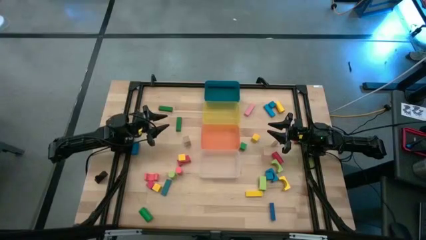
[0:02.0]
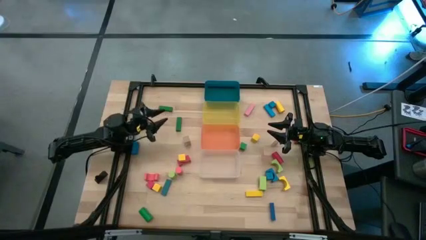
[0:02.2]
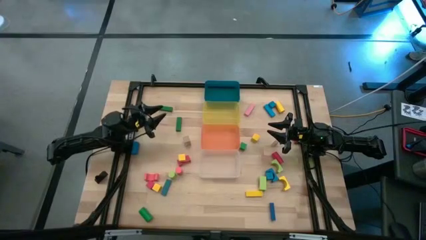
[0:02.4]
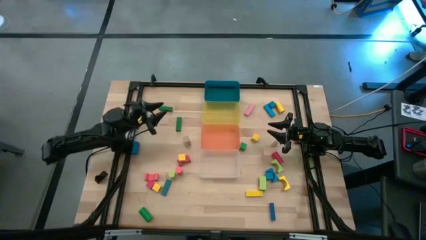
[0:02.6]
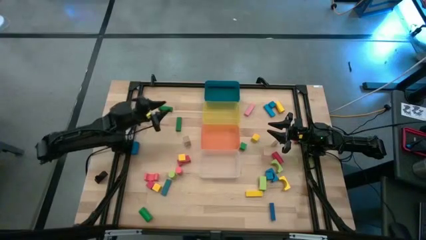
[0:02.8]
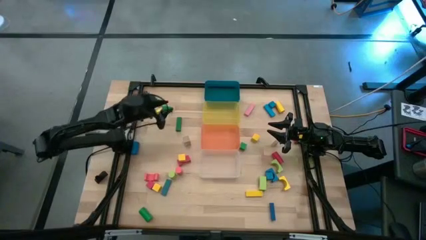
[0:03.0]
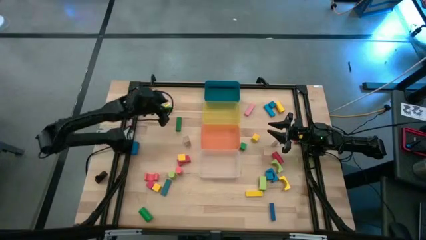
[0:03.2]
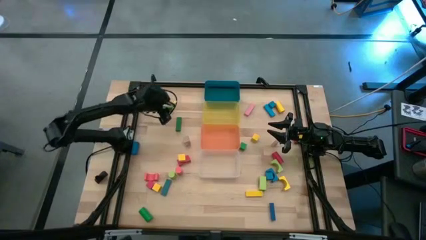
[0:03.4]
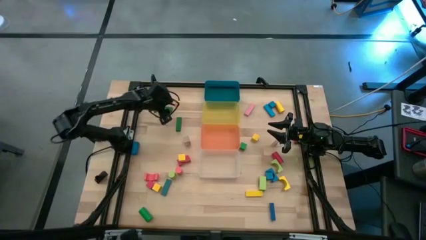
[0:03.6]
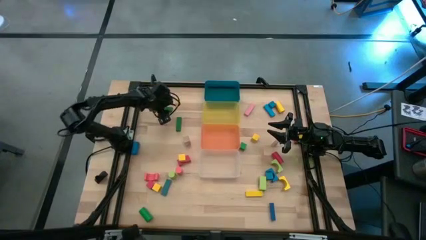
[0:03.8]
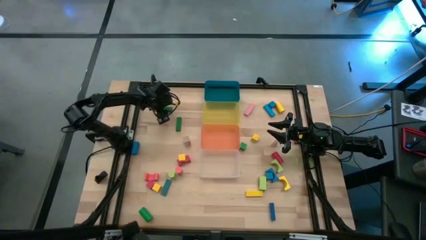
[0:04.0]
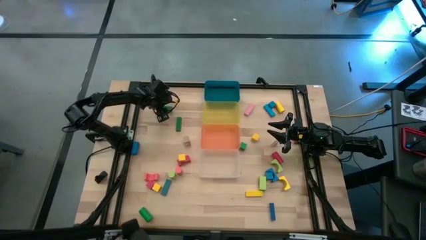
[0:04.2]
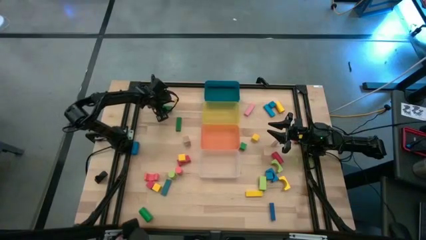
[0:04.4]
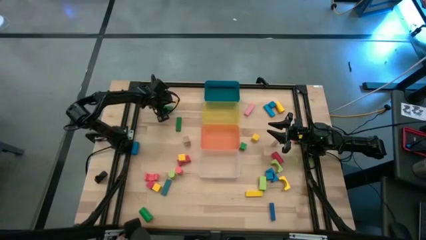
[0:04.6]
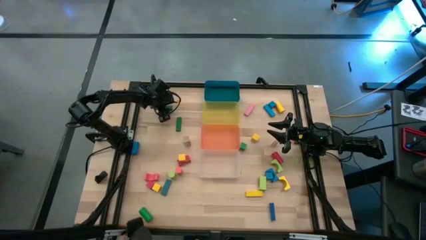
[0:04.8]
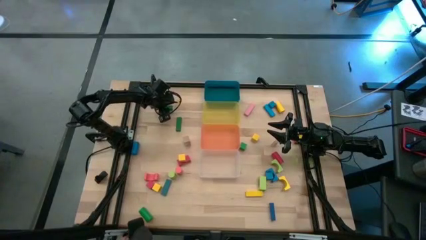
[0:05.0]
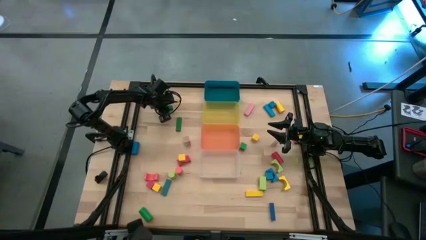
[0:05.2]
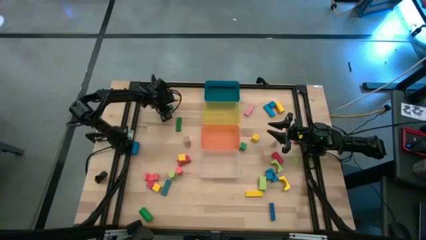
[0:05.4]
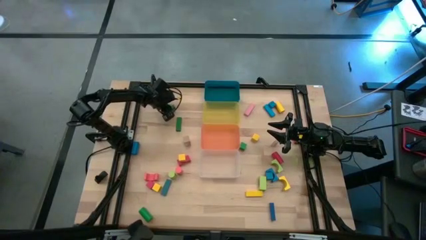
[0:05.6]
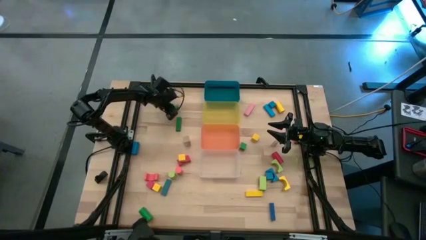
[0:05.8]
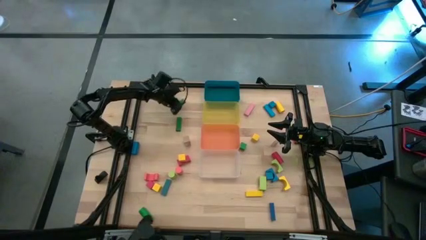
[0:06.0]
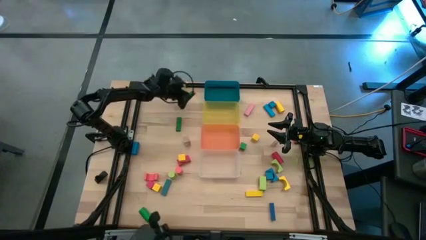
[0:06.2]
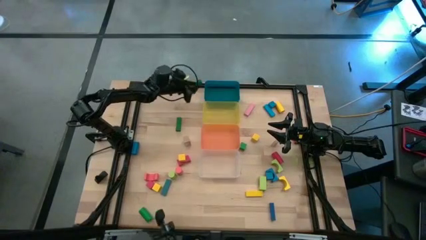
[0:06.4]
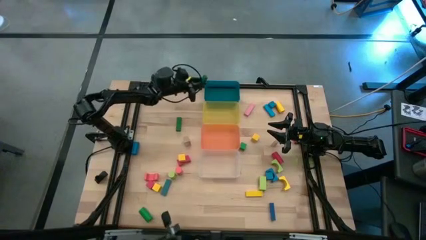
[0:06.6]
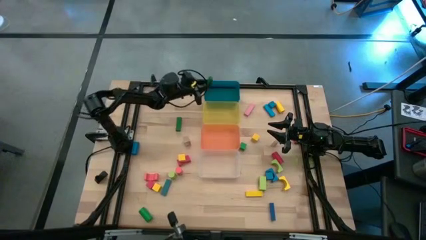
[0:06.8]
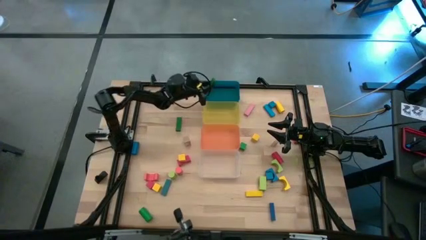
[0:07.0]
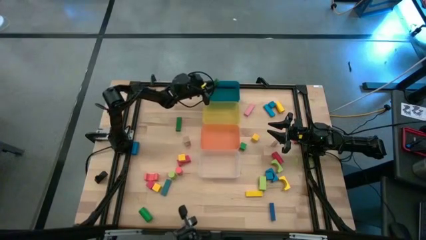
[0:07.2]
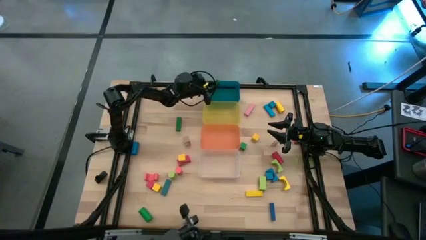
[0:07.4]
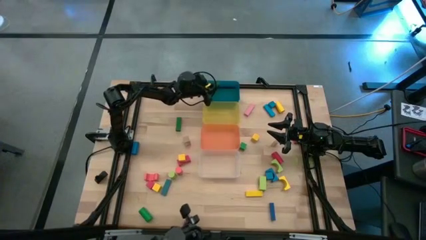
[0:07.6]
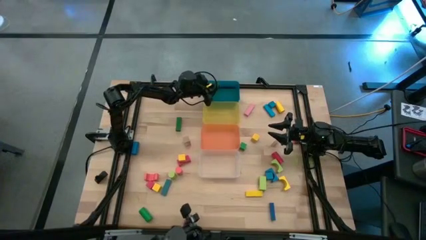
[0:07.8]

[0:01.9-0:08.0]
Task: Sort blocks by size
Put the green rectangular block into the blue bin

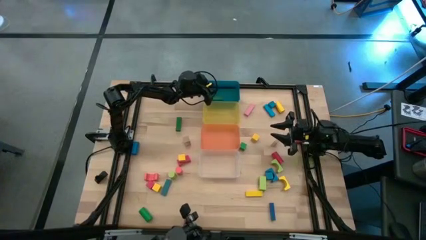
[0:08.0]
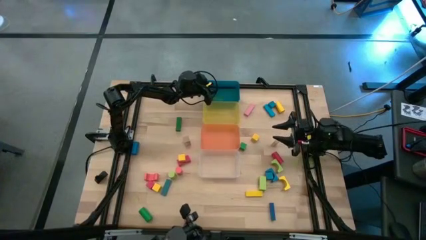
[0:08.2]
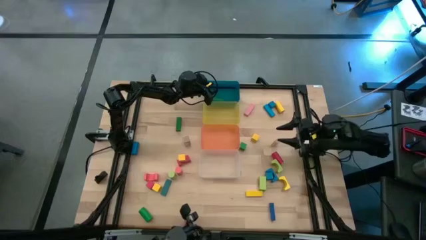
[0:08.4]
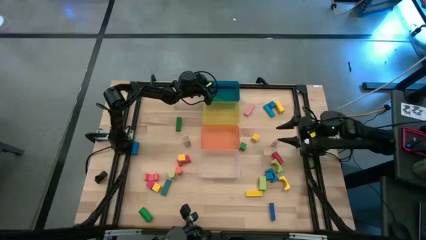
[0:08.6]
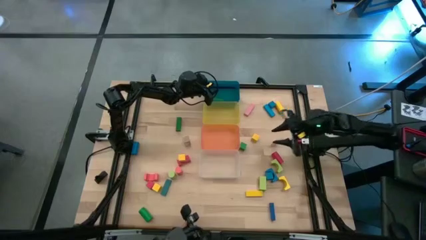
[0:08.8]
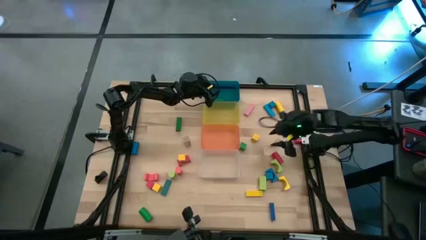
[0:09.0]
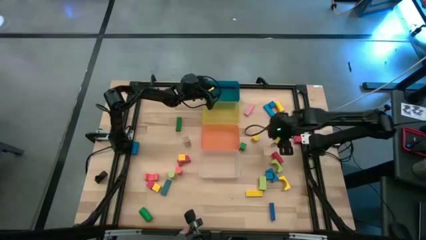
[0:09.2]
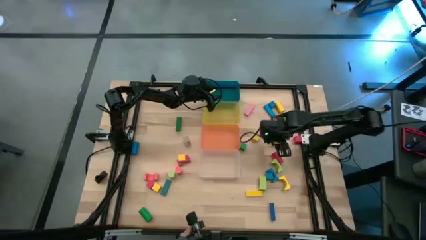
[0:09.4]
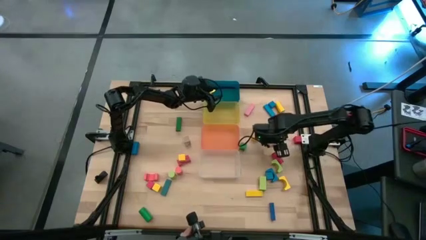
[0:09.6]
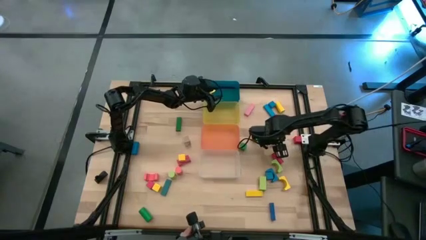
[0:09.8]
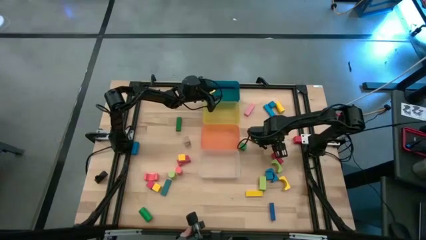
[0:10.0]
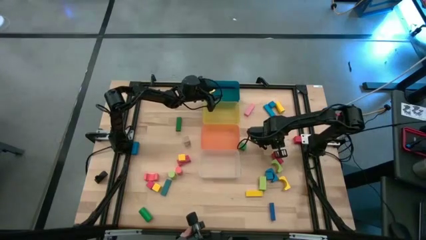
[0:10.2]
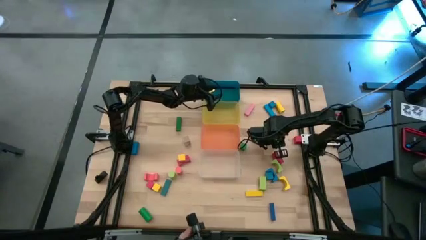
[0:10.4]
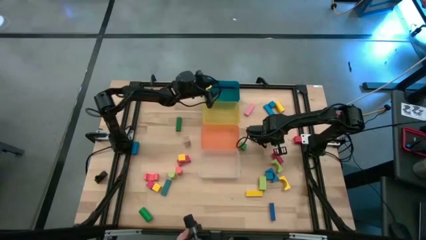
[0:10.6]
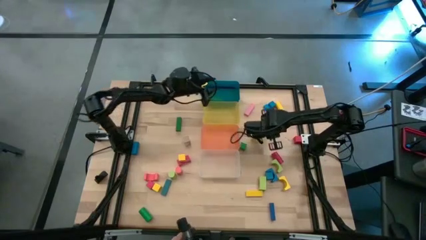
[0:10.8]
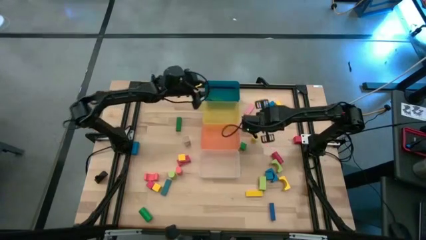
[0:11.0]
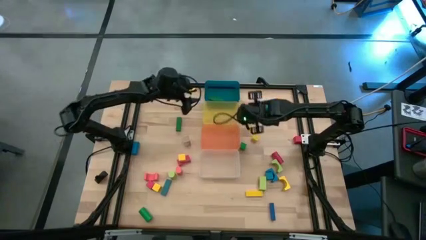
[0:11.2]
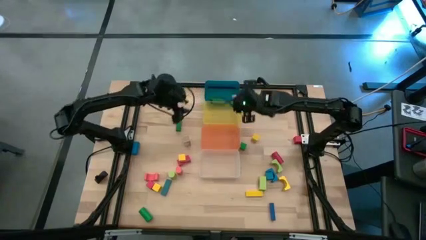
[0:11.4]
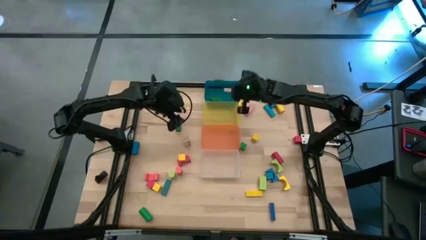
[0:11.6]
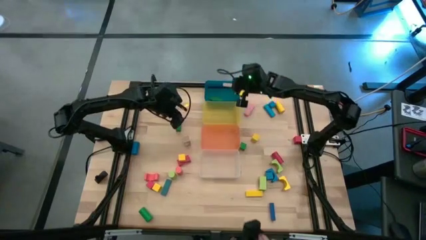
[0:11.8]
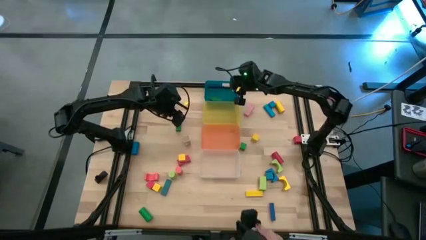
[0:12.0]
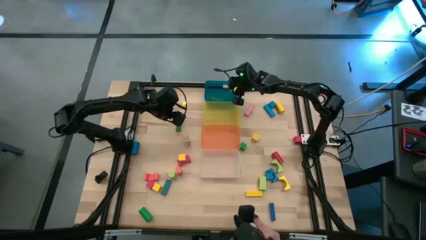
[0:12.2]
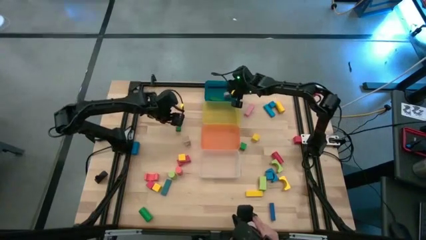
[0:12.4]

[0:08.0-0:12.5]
Put the wooden rectangular block into the blue bin

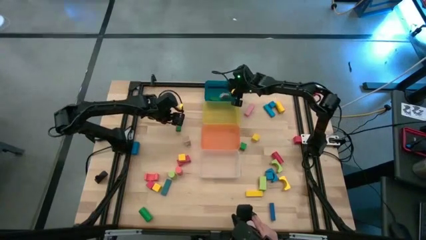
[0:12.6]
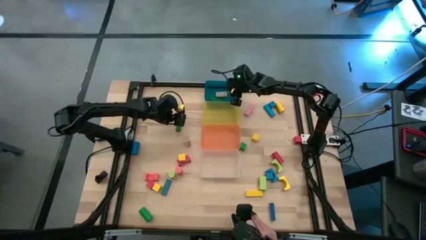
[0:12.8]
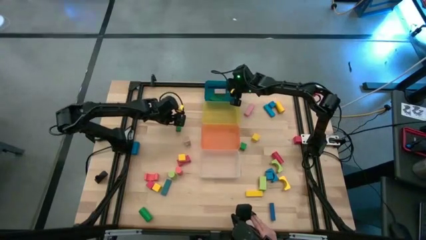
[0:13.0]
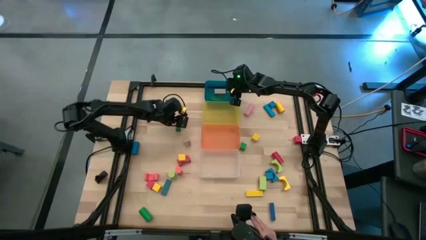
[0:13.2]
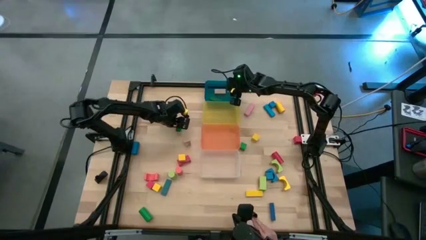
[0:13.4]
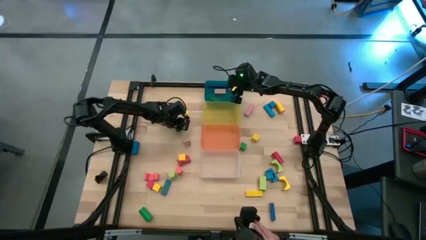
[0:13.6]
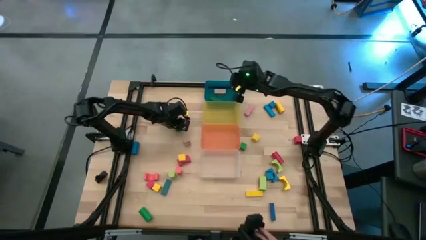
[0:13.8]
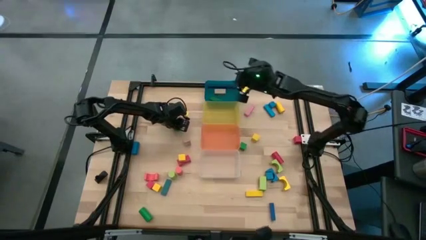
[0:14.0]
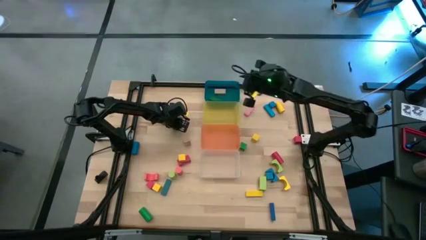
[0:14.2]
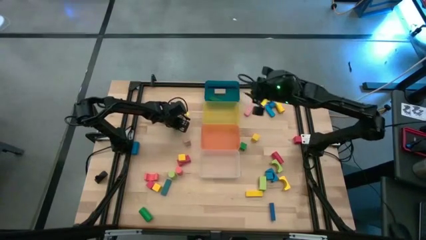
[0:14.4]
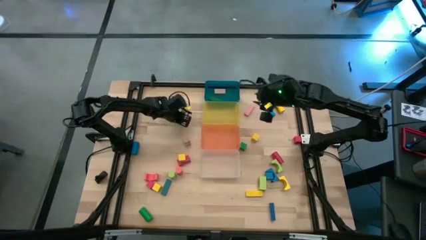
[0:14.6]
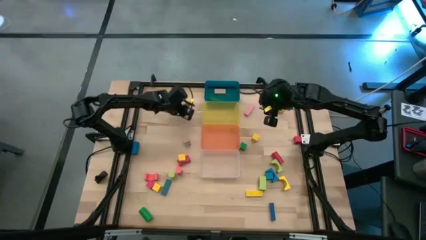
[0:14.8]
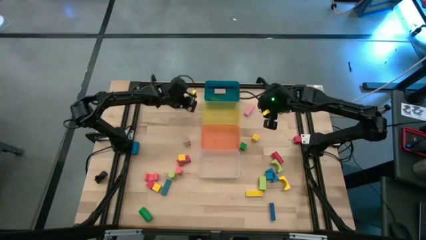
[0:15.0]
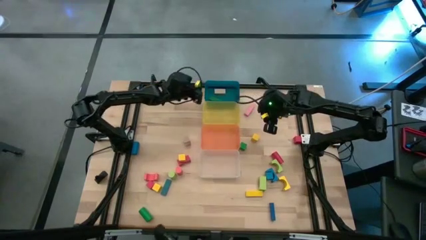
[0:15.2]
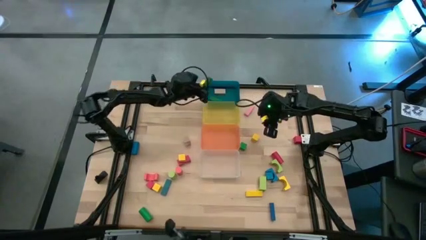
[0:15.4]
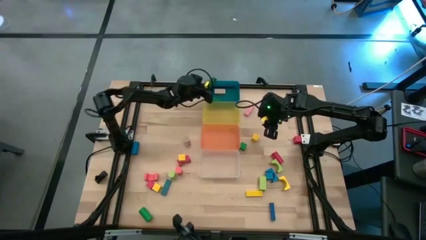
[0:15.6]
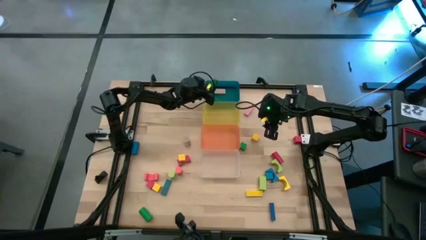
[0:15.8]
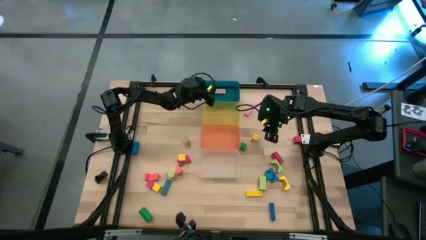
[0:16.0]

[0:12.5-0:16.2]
Put the green rectangular block into the blue bin

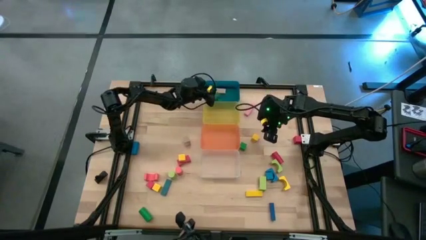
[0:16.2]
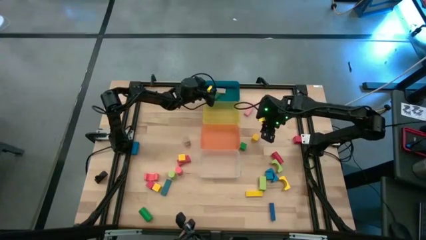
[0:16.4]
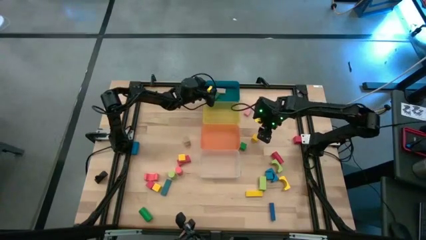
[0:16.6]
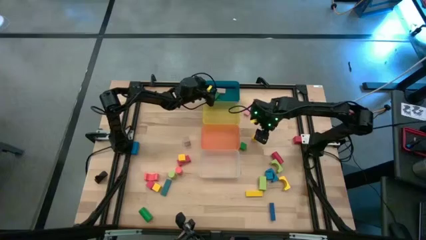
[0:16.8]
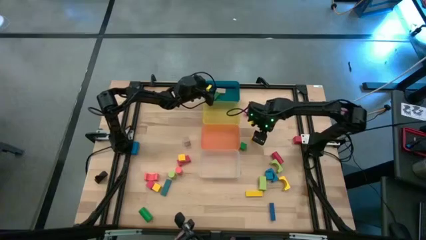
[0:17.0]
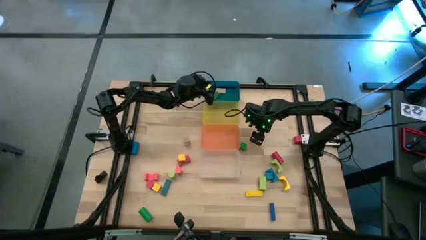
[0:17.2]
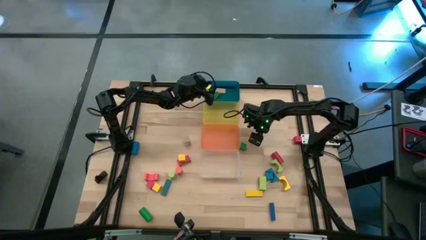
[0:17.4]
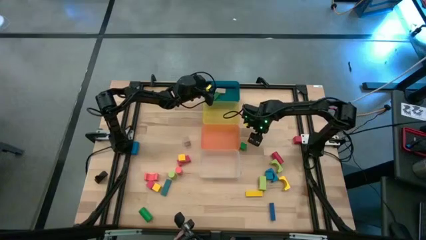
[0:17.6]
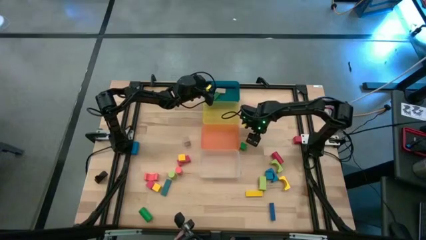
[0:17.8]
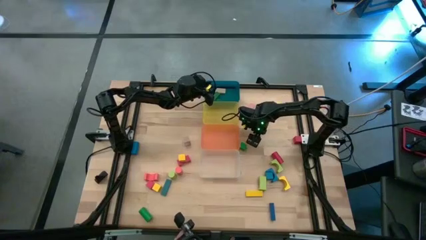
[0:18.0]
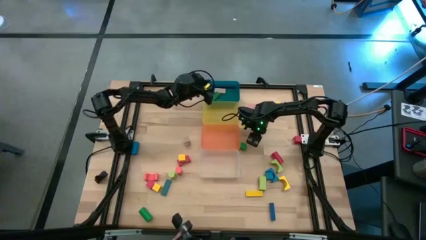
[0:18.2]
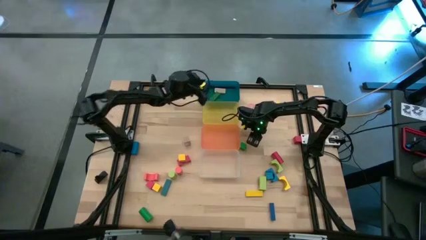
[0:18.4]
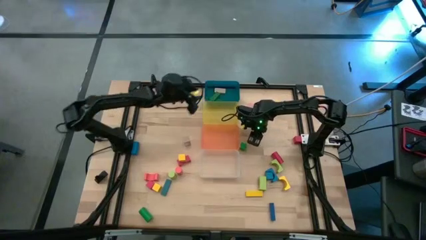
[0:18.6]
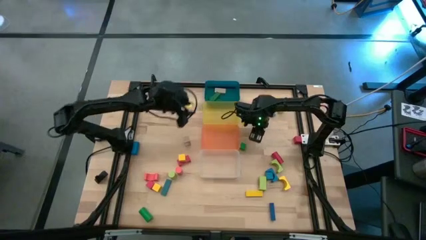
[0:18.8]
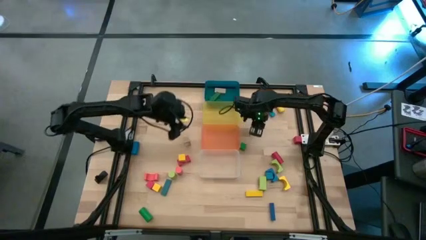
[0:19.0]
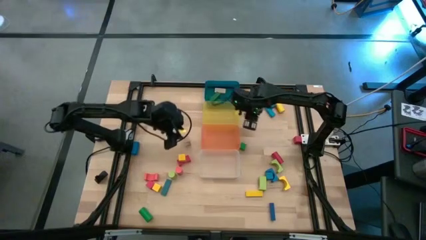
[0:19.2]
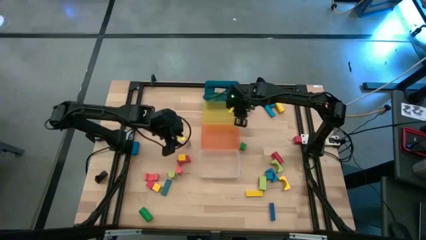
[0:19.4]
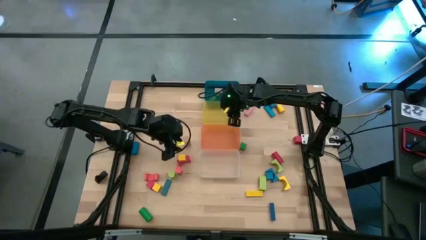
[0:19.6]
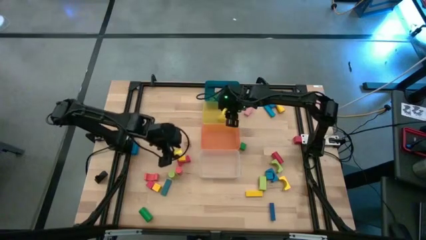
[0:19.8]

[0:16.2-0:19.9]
Put the yellow square block into the yellow bin
